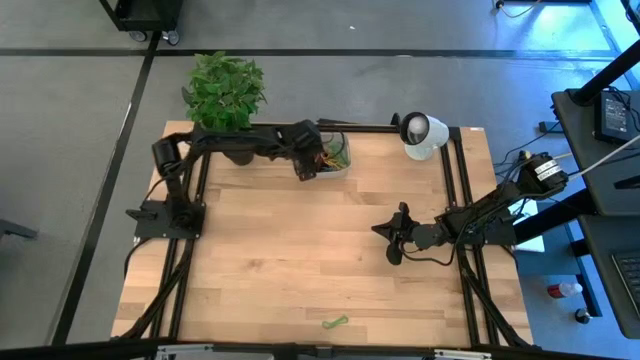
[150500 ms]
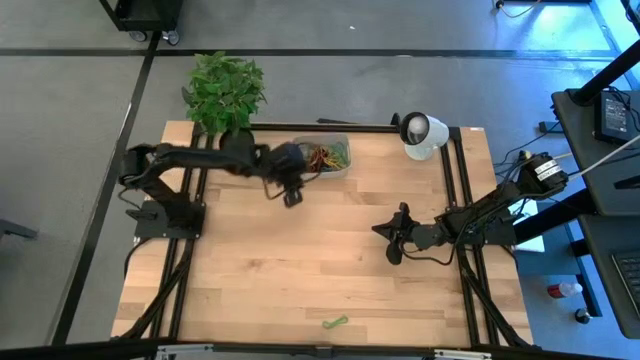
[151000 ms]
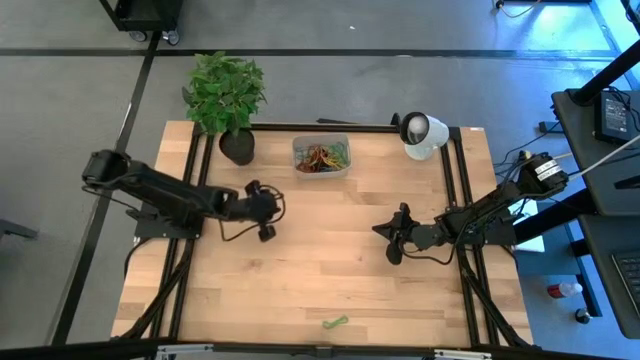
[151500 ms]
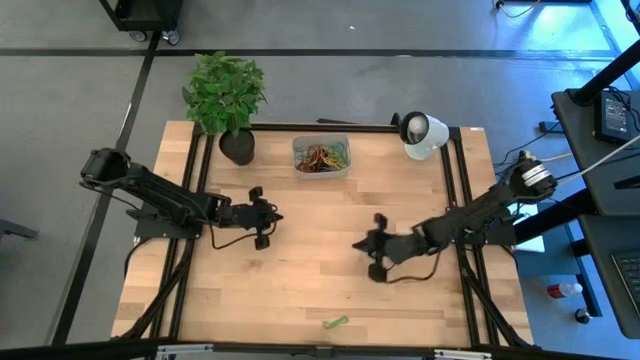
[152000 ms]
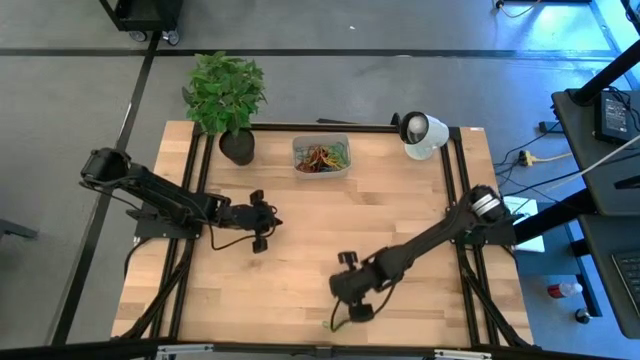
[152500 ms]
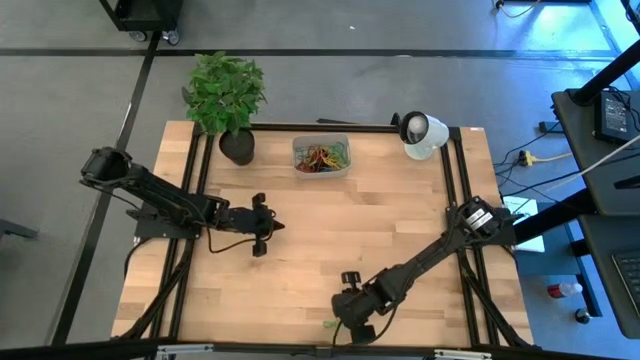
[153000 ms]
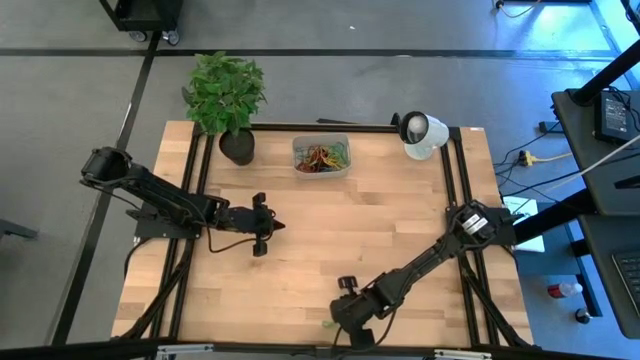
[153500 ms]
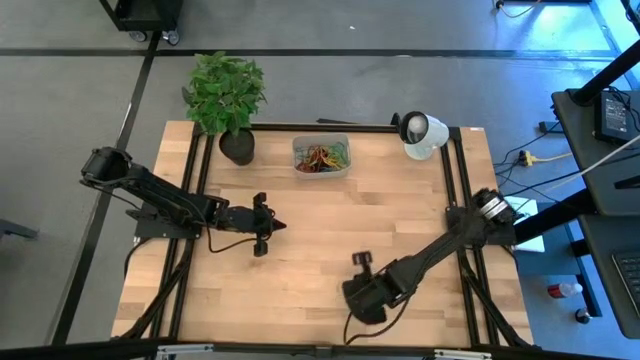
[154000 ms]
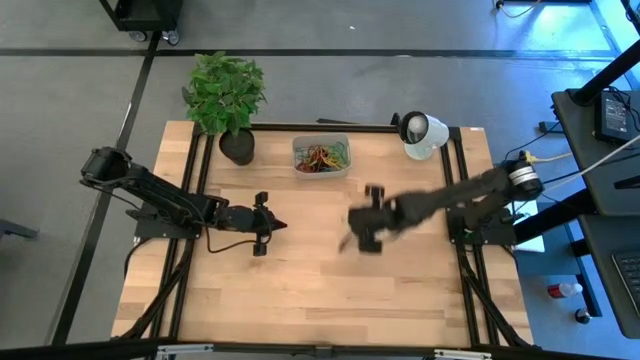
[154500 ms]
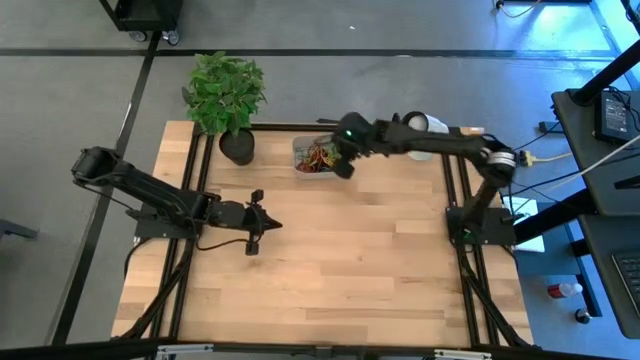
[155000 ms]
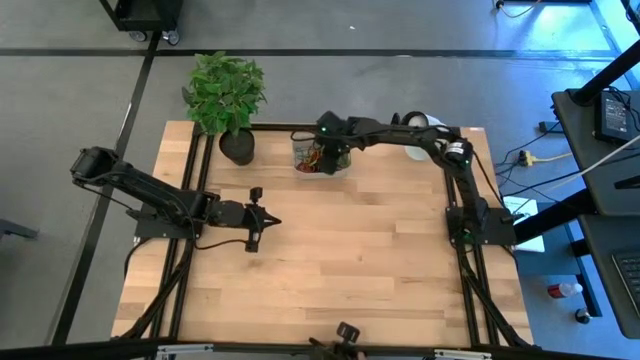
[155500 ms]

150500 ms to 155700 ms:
Task: Pick and place rubber bands into bin
Put the green rubber band into the gray bin

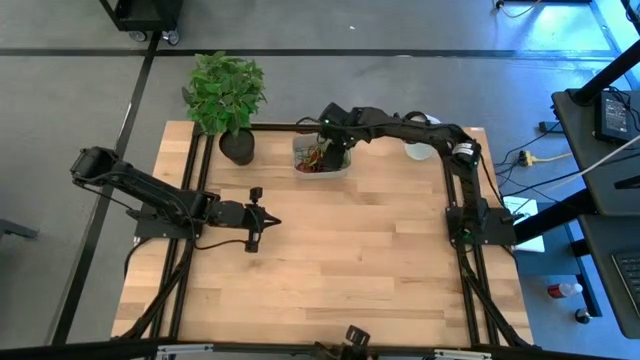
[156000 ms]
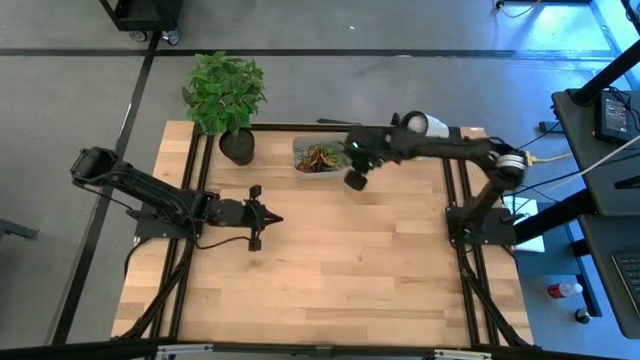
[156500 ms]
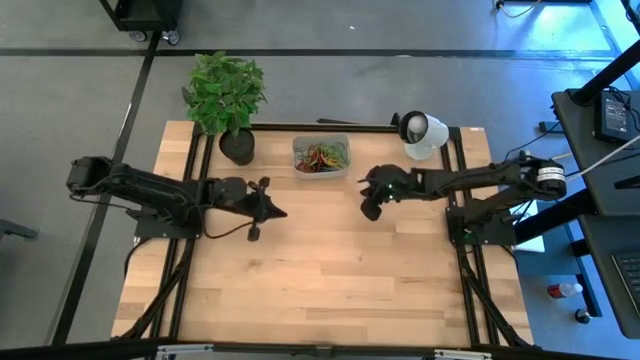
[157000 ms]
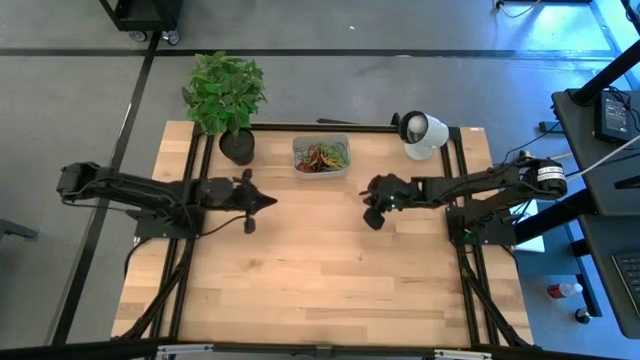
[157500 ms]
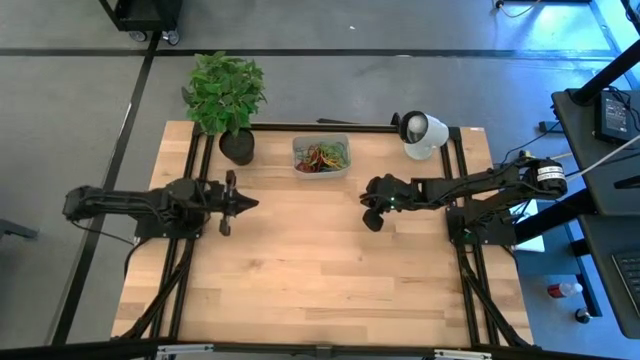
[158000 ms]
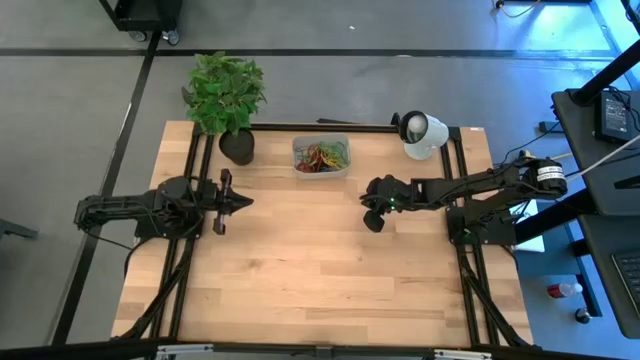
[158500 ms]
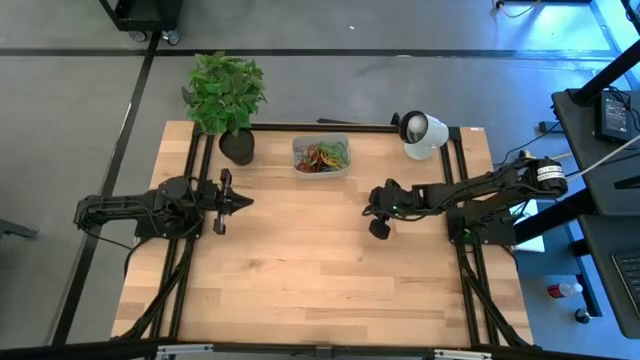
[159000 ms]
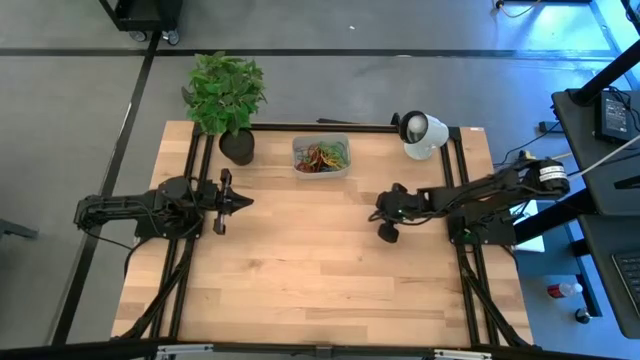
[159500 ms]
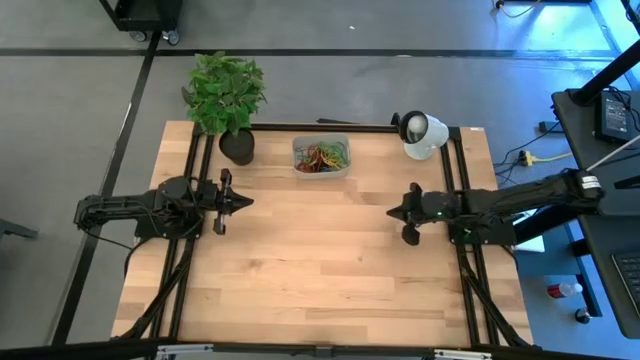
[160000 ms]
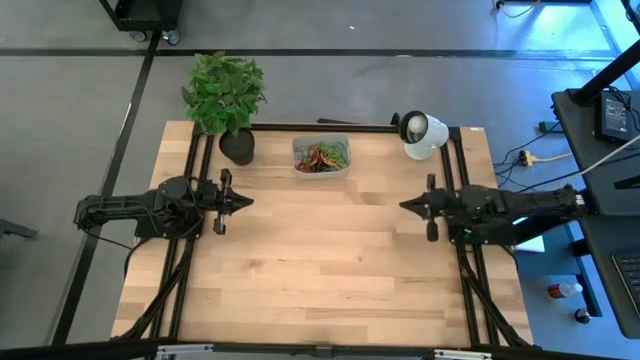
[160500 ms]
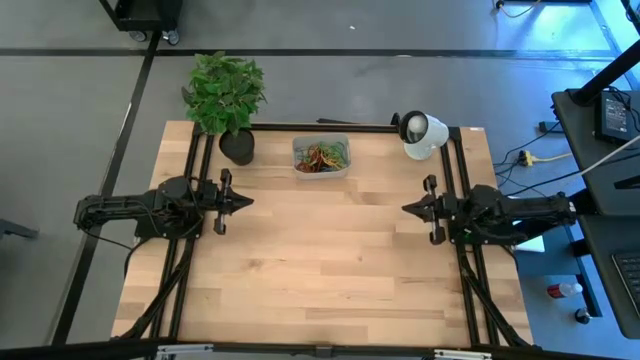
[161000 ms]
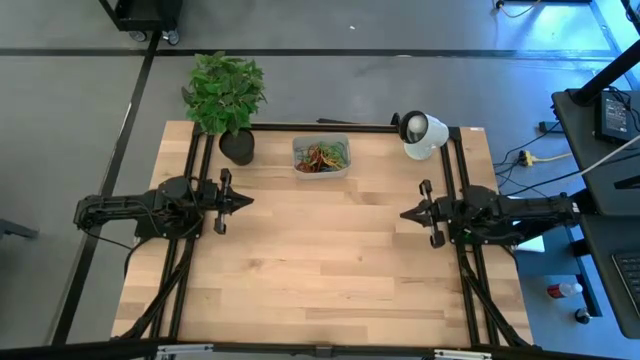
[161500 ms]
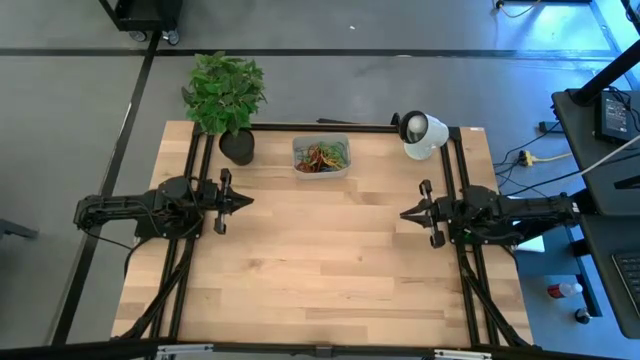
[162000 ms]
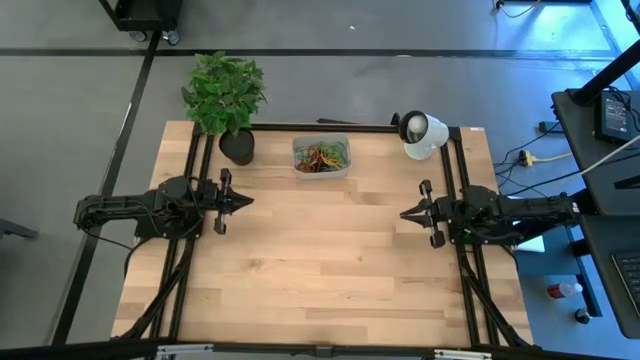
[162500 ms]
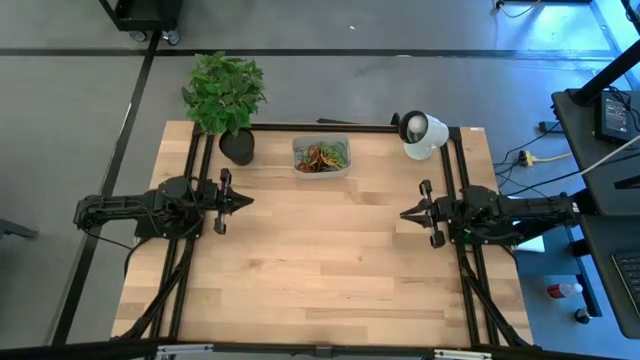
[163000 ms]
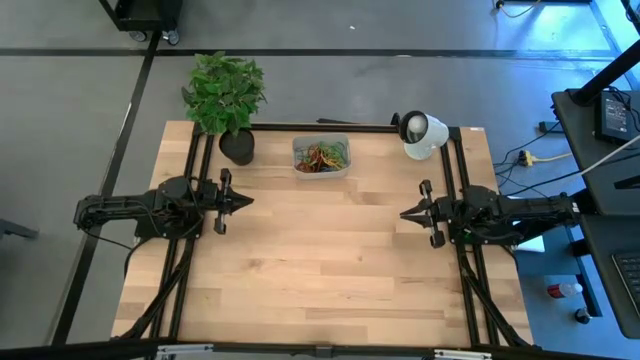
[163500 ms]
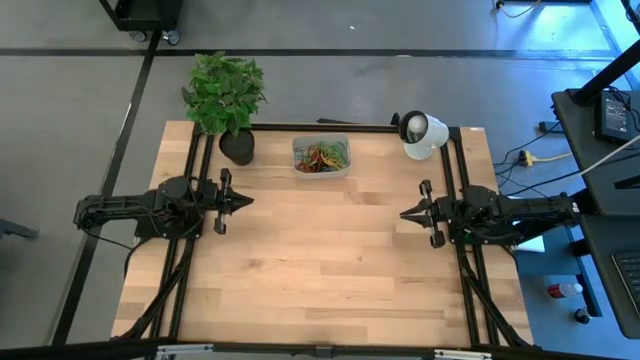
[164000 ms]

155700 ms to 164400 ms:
Return to Home Position

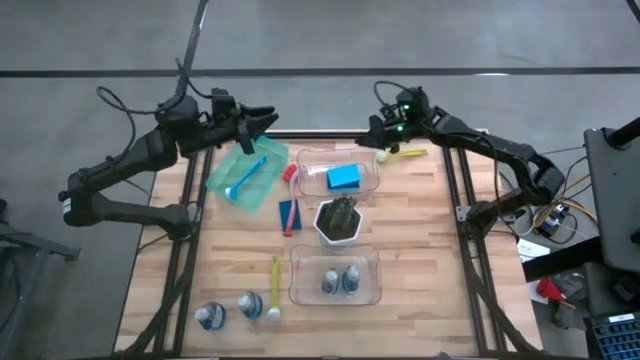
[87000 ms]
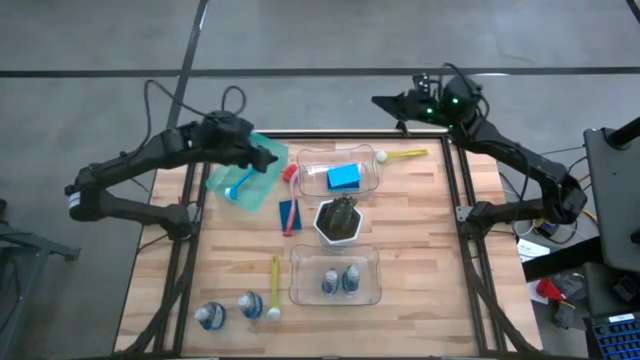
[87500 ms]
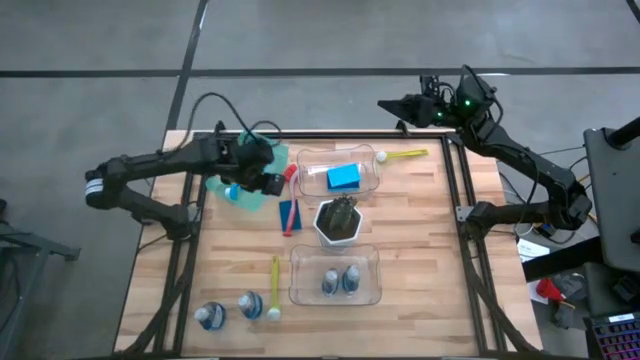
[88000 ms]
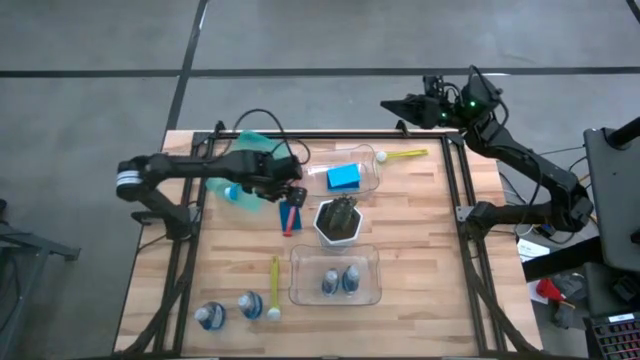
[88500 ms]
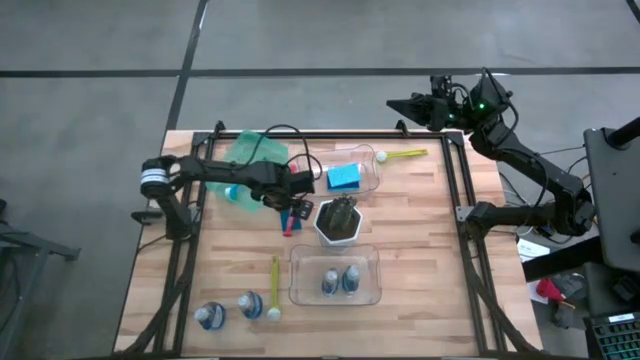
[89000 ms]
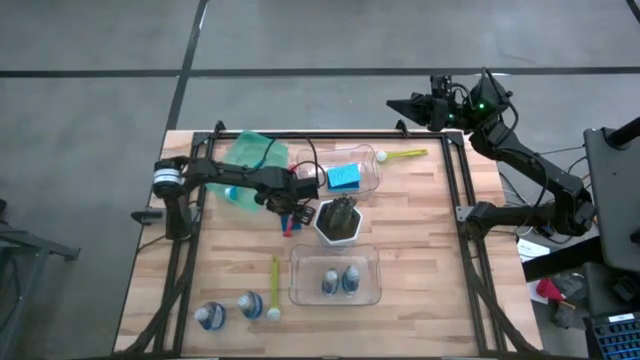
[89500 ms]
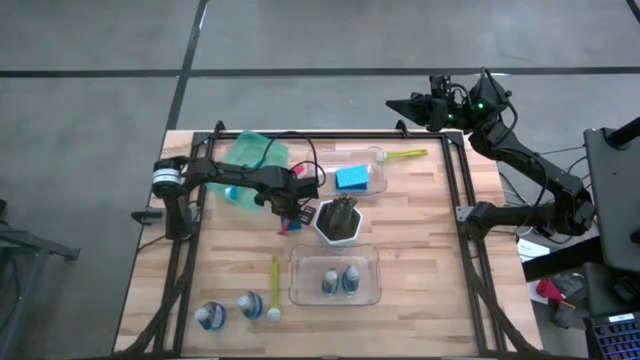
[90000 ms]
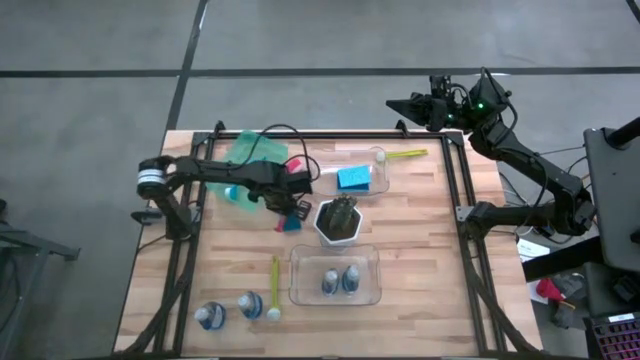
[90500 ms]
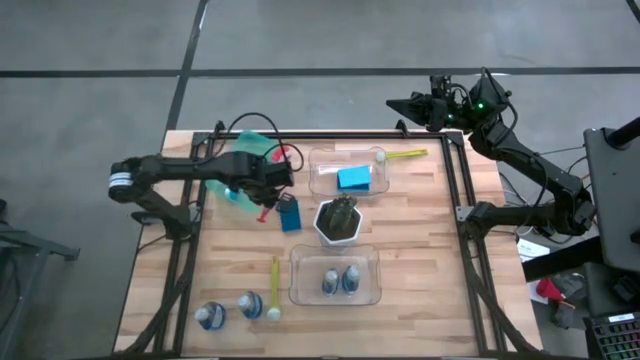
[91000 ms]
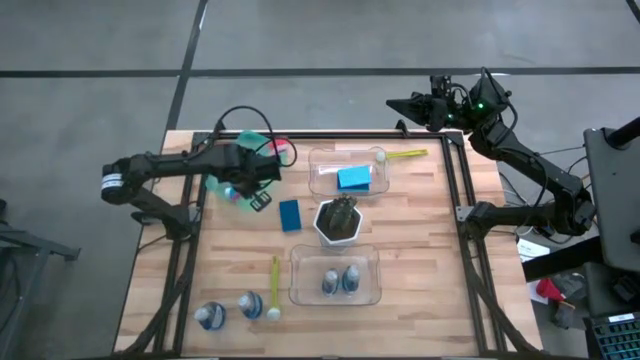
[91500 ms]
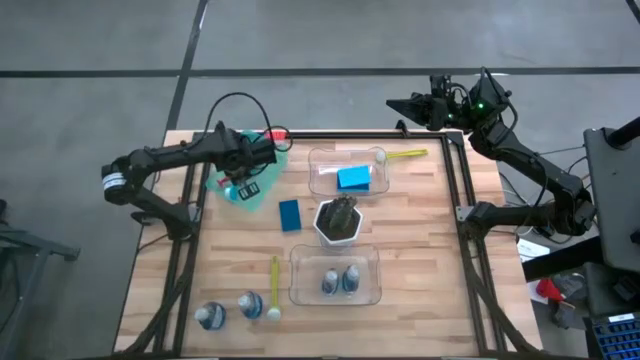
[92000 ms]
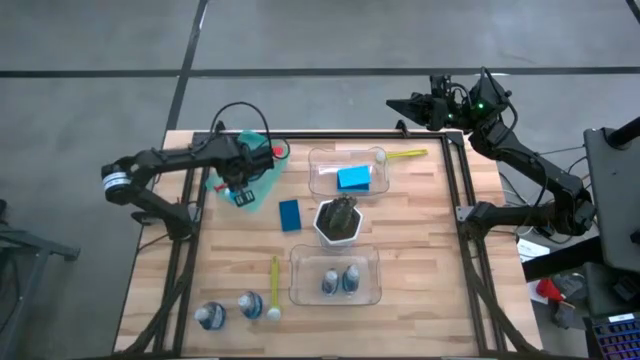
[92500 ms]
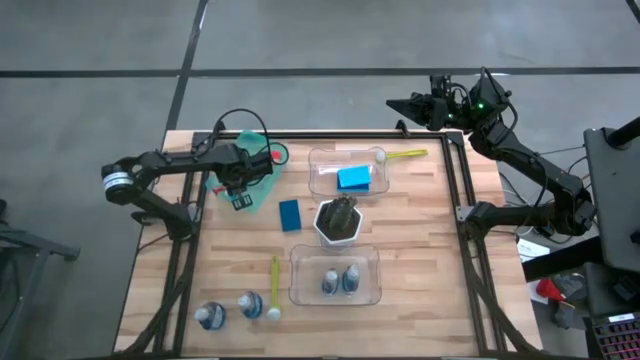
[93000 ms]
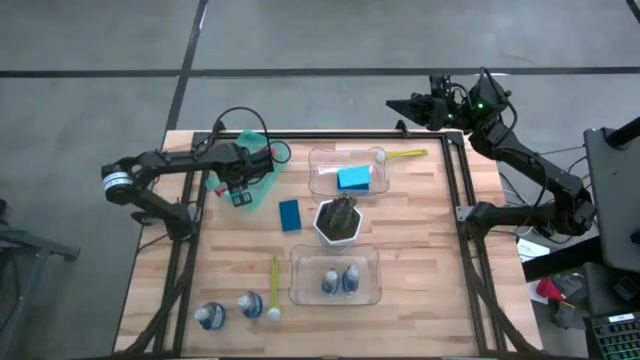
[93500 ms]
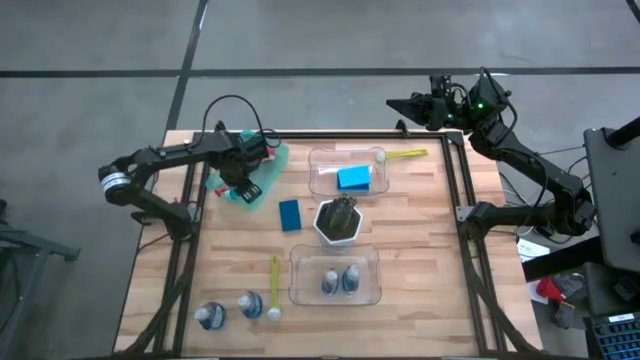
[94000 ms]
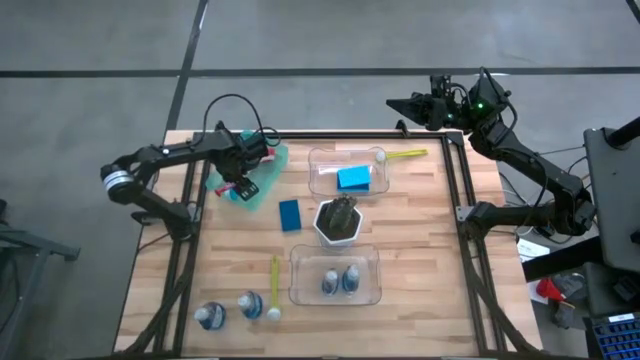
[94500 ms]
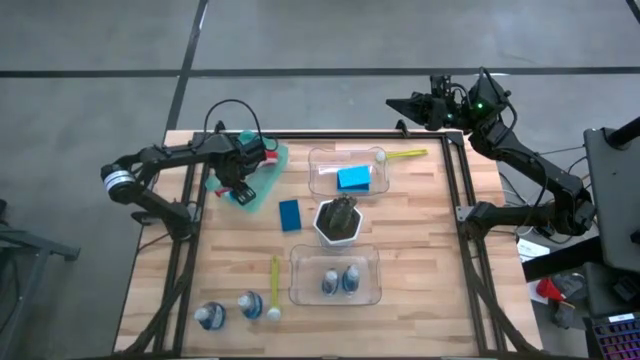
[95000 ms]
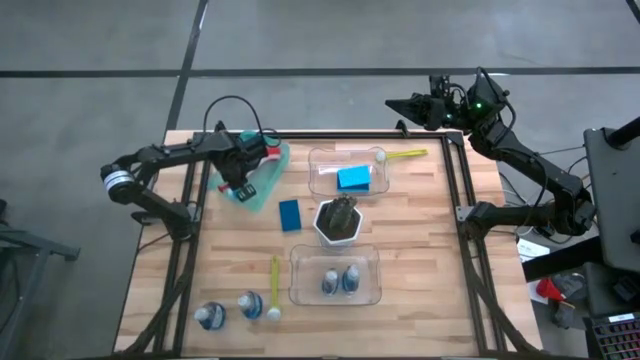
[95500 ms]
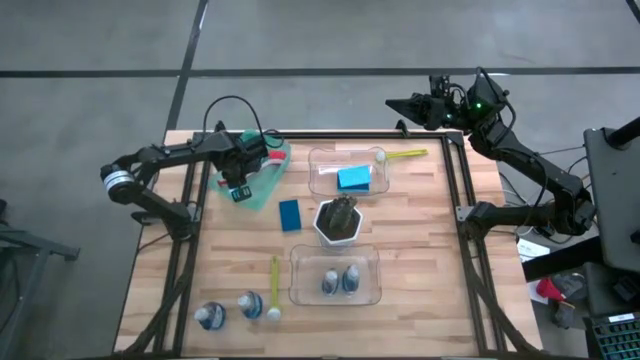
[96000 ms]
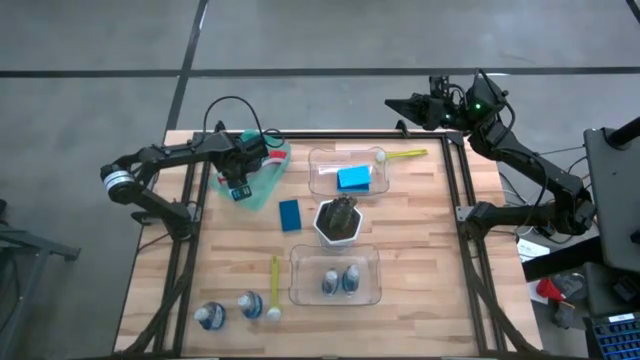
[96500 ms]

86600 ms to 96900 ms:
Task: Pick & Place Kitchen Sink Supplies
Put the orange dishwashing brush into the light blue bin
